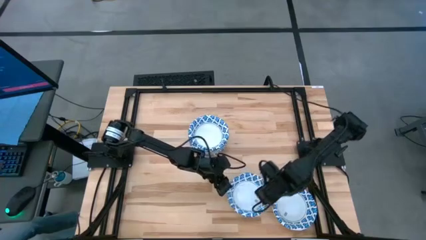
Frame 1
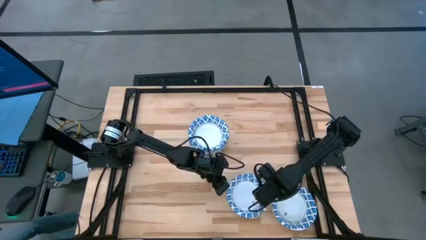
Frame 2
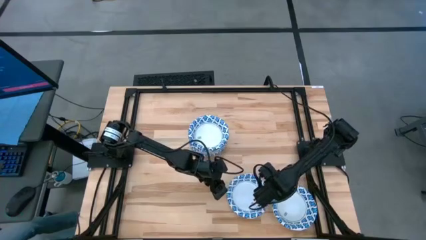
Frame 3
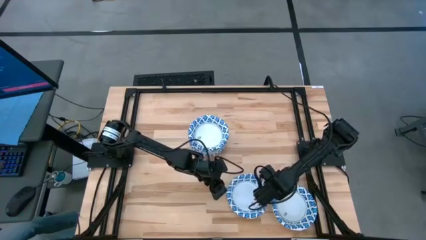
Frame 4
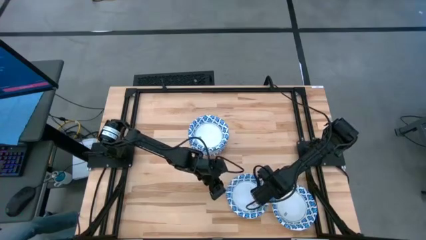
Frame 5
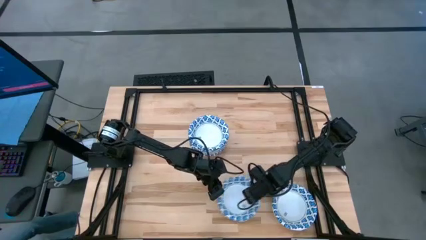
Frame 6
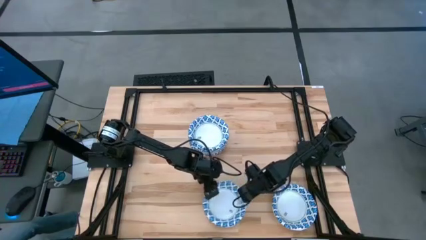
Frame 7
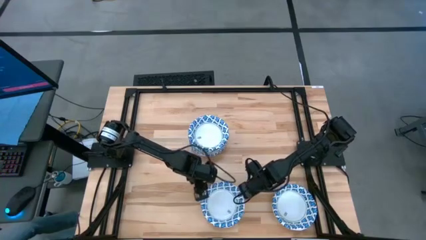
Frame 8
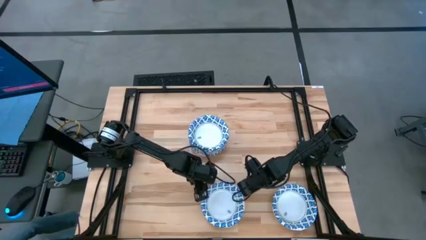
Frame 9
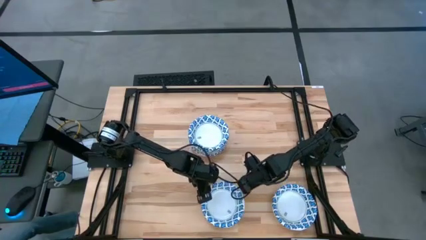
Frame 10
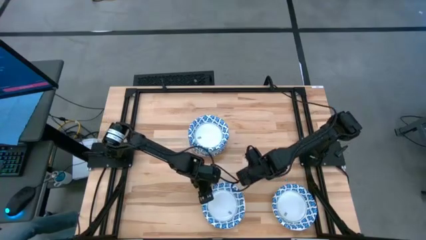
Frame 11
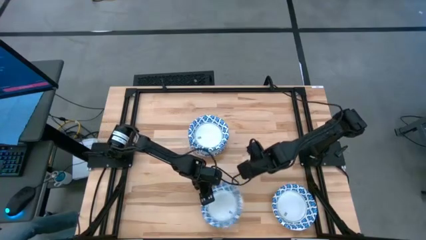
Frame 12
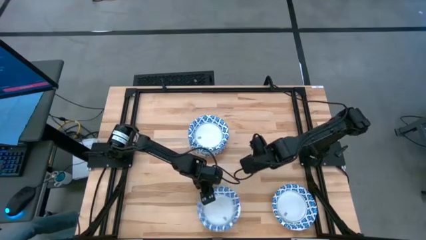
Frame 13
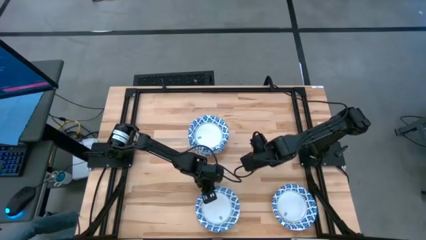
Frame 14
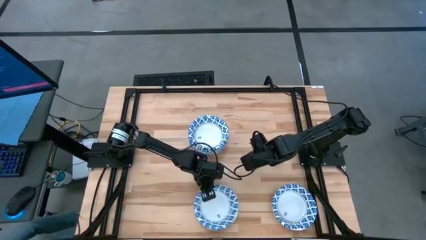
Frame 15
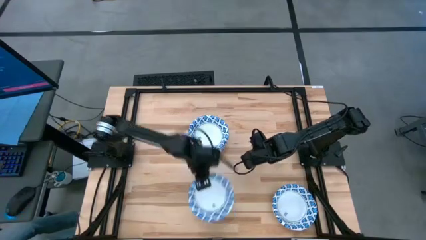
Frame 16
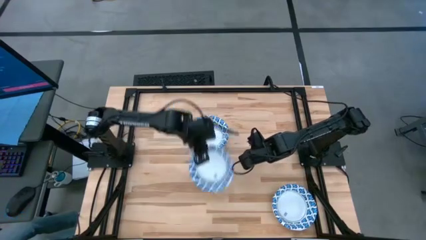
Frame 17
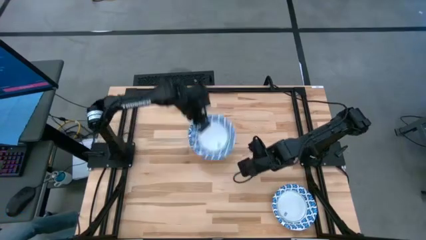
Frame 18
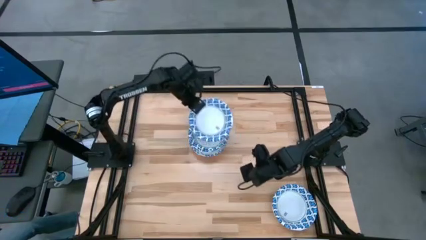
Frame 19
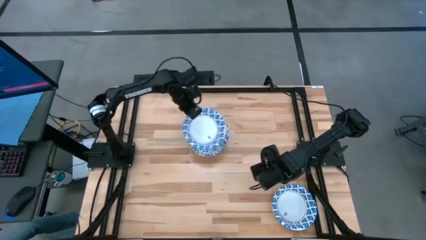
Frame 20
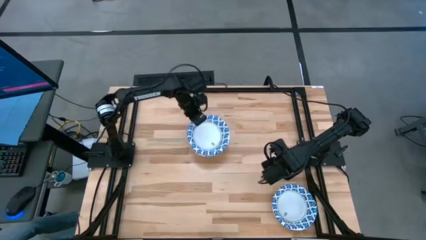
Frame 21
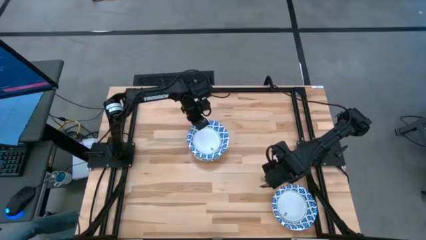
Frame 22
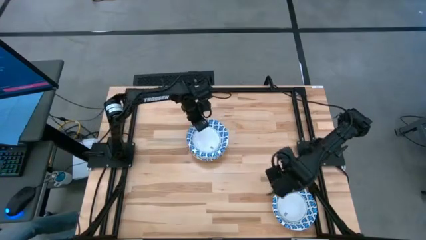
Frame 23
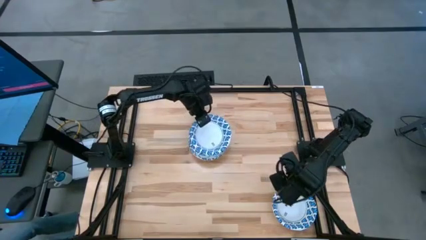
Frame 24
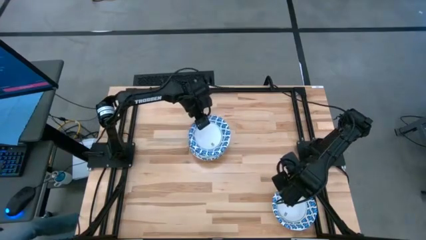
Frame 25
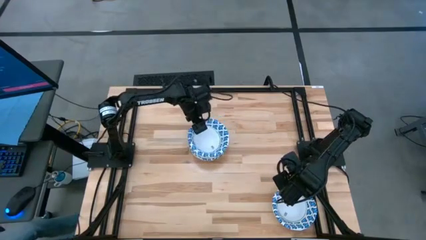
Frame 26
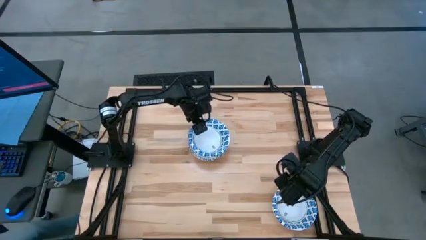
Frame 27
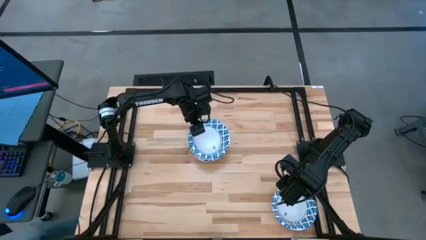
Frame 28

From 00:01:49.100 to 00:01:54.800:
Task: Nest bowls inside each other
Stack the blue bowl on top of the blue bowls

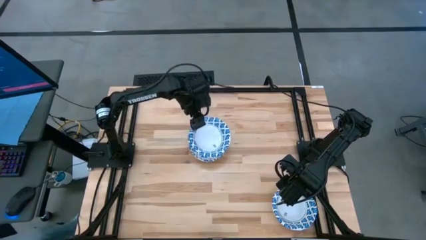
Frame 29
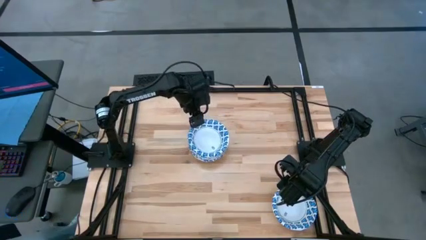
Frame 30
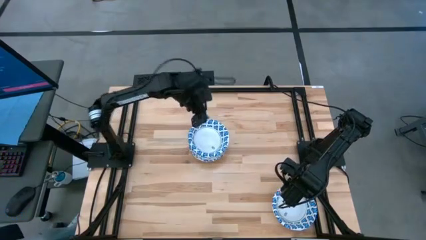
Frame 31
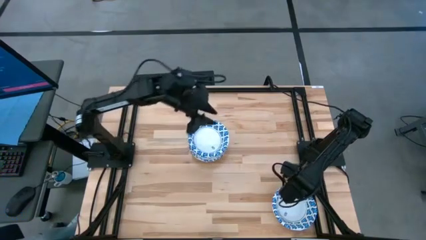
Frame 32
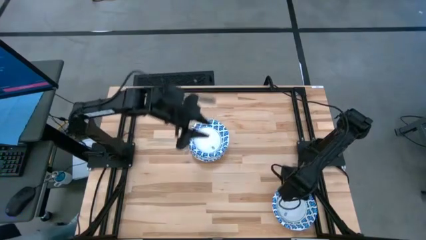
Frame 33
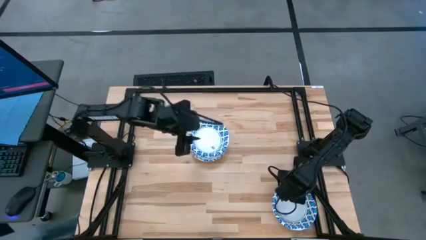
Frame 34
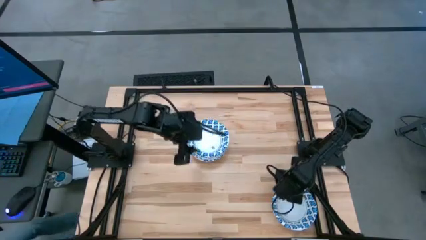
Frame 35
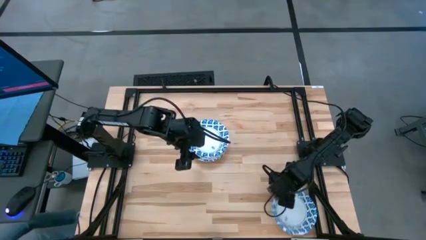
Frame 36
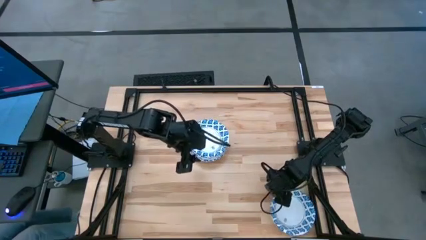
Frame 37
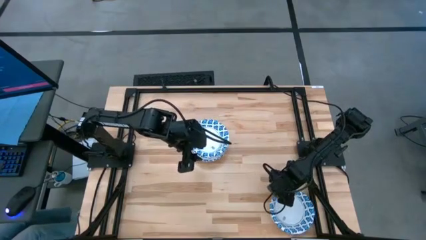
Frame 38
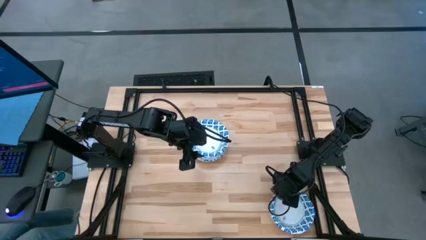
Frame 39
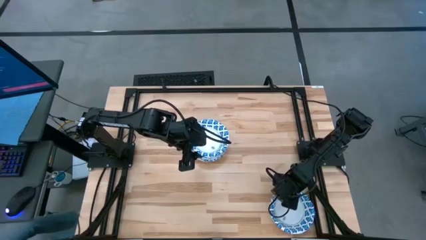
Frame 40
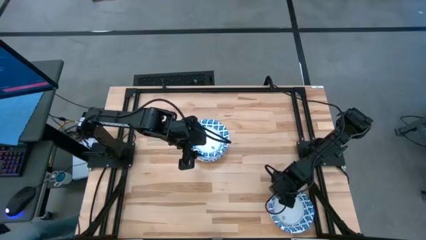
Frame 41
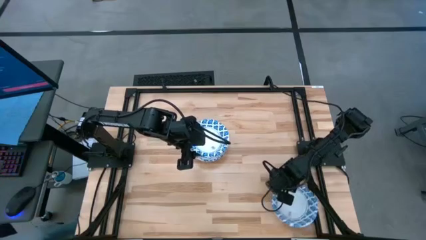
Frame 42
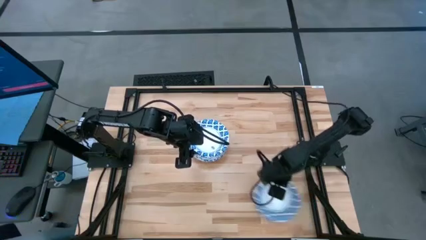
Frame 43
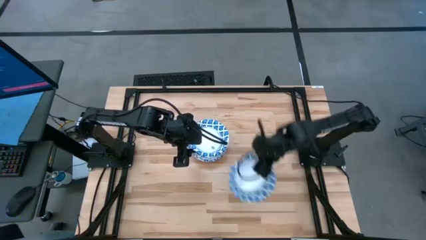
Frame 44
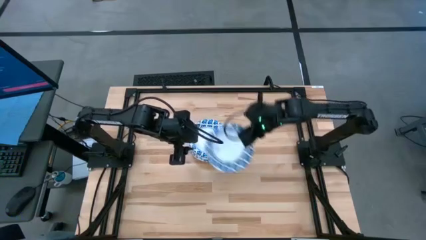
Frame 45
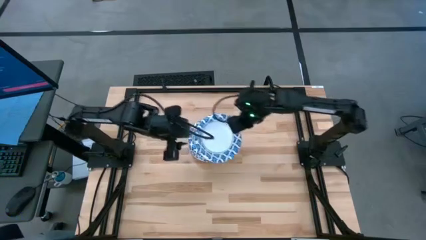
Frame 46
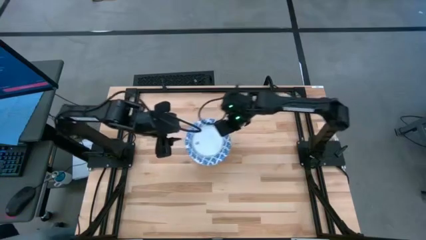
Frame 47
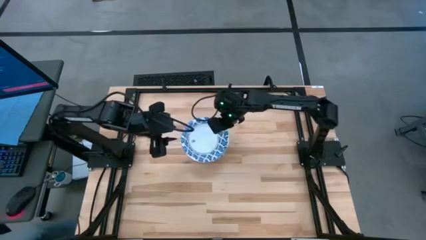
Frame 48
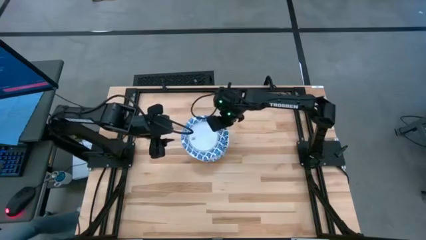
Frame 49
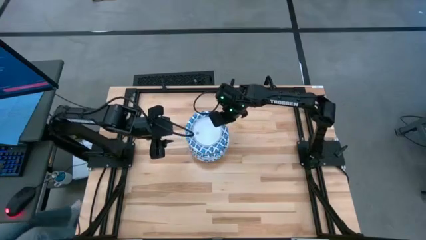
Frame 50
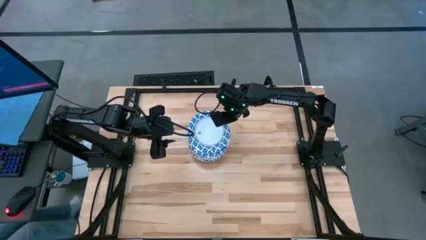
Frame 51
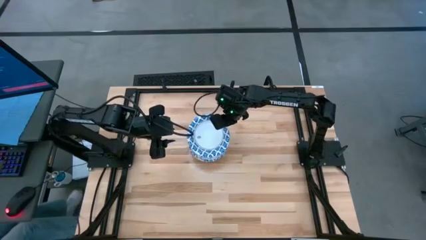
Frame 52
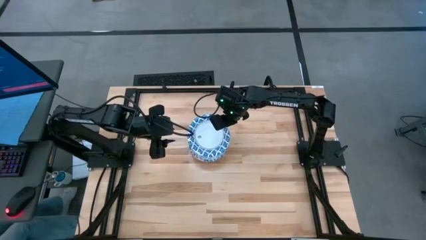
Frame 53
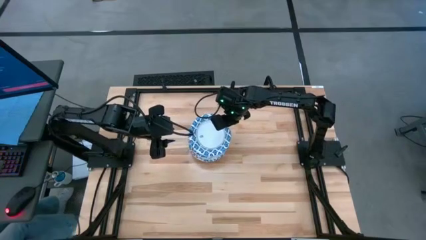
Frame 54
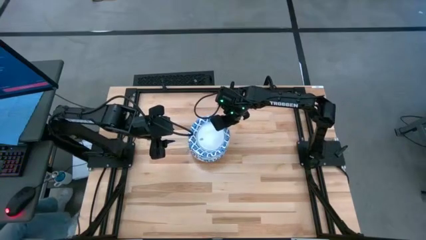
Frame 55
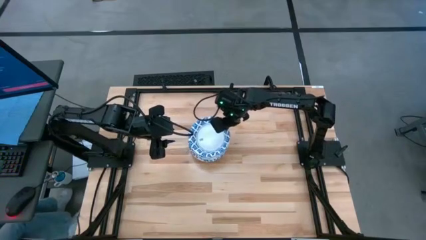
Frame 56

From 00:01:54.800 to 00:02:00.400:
Stack the blue bowl on top of the blue bowls
